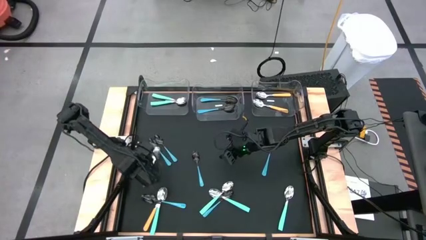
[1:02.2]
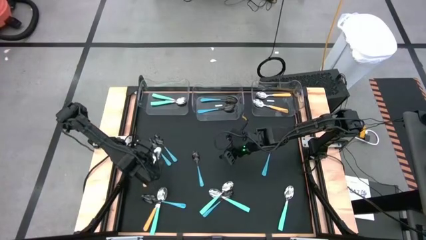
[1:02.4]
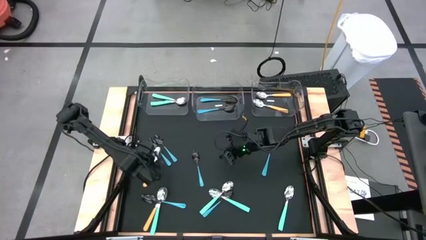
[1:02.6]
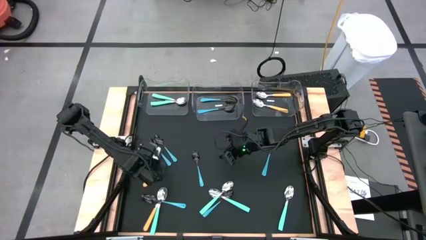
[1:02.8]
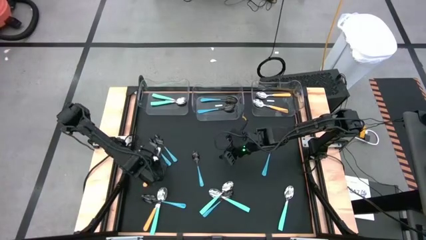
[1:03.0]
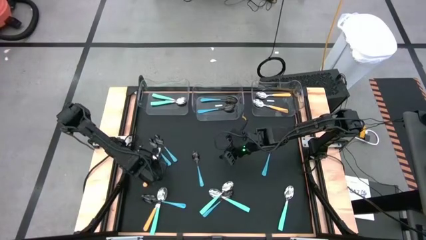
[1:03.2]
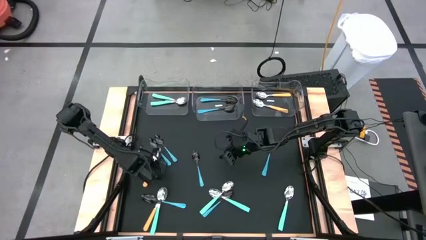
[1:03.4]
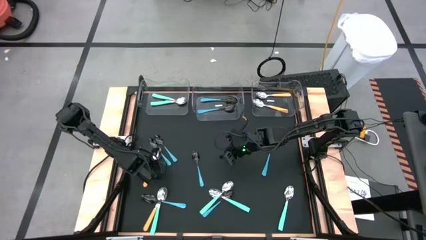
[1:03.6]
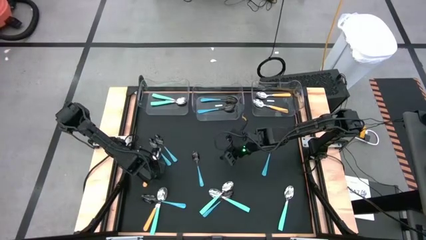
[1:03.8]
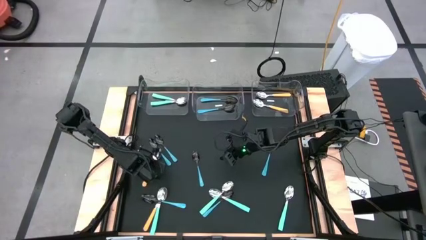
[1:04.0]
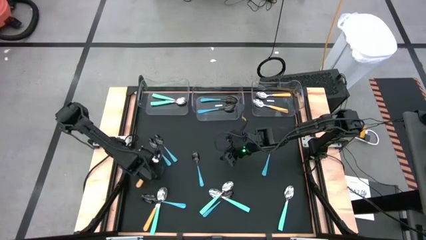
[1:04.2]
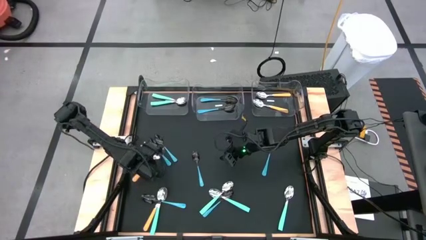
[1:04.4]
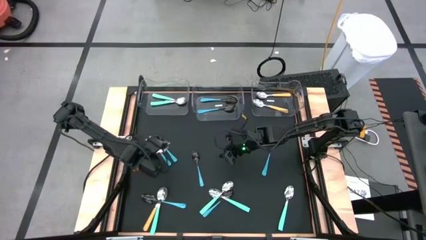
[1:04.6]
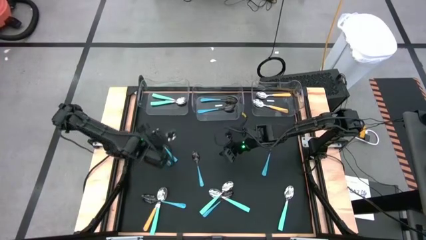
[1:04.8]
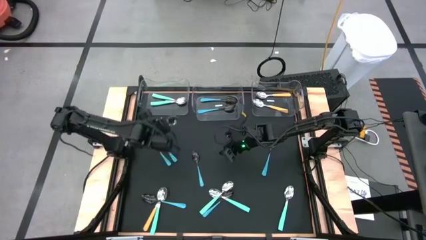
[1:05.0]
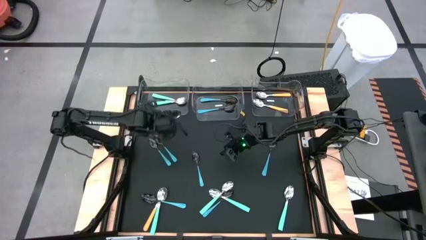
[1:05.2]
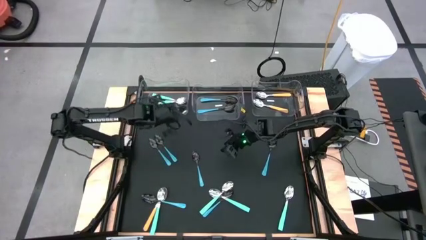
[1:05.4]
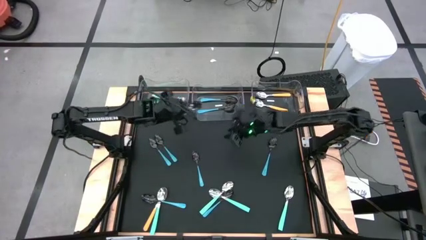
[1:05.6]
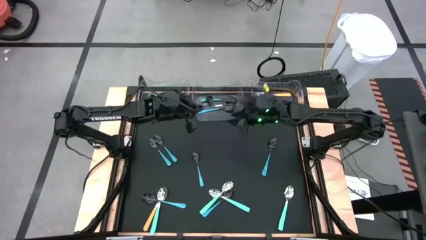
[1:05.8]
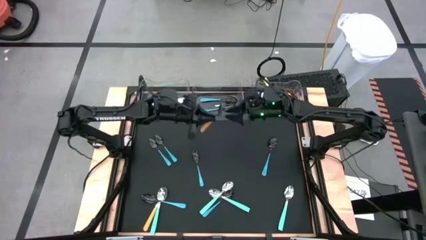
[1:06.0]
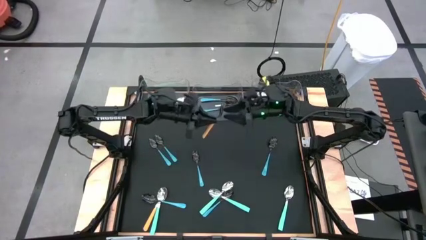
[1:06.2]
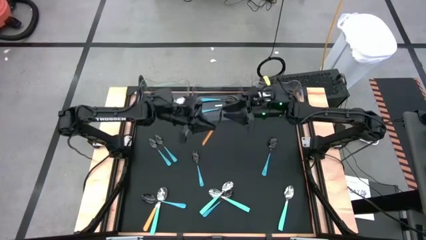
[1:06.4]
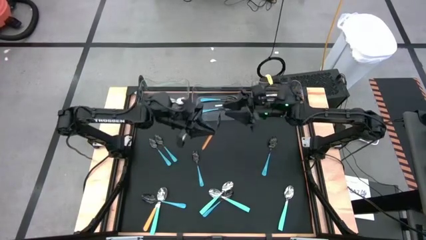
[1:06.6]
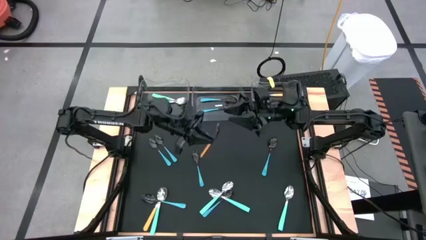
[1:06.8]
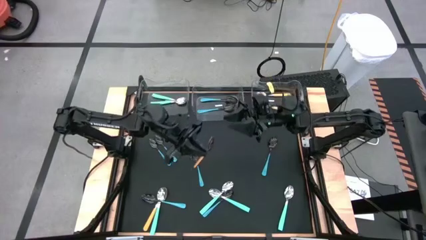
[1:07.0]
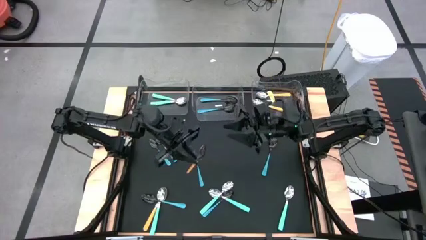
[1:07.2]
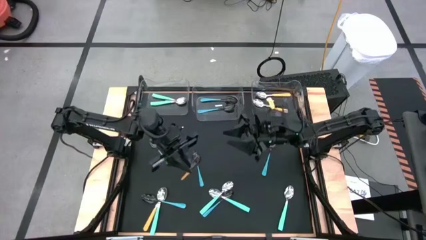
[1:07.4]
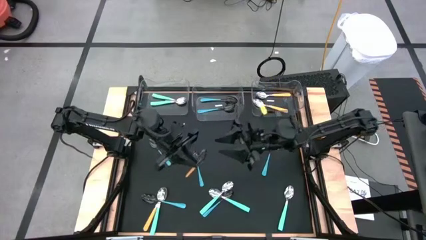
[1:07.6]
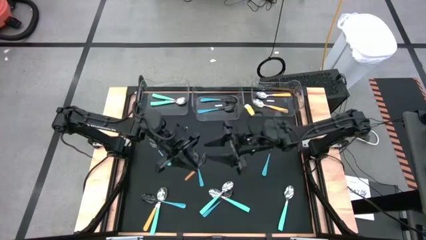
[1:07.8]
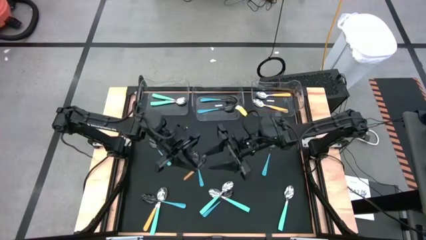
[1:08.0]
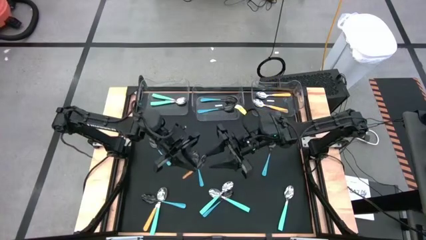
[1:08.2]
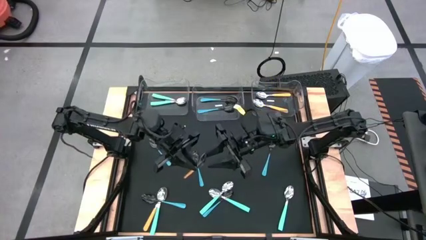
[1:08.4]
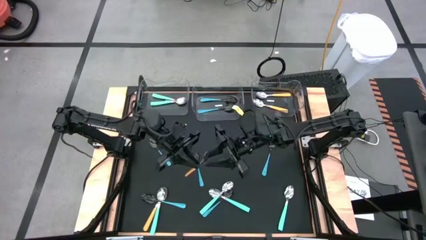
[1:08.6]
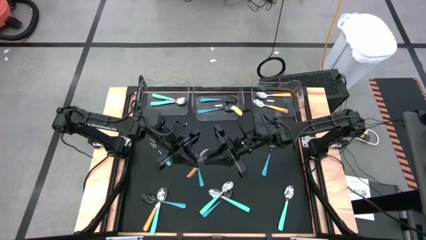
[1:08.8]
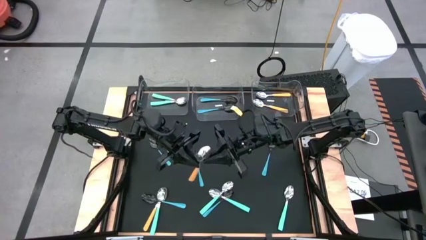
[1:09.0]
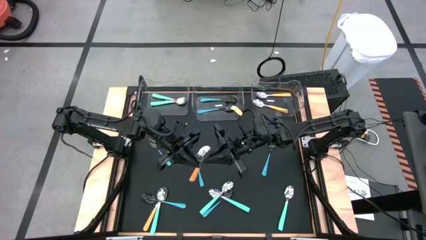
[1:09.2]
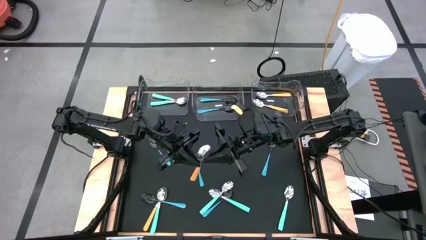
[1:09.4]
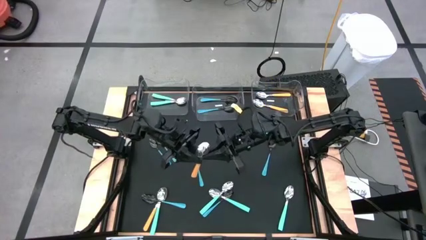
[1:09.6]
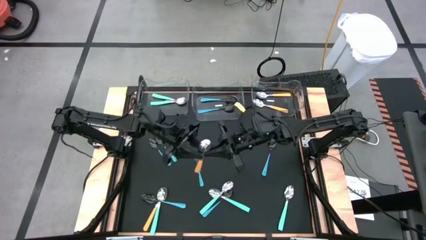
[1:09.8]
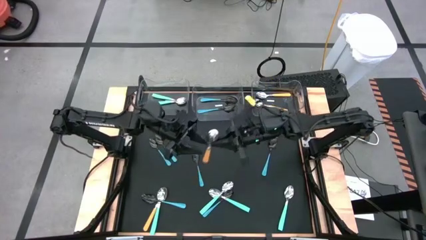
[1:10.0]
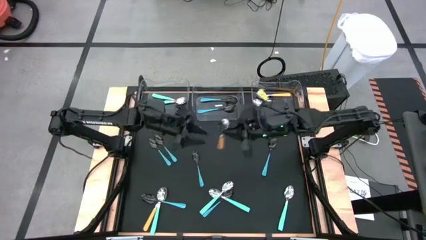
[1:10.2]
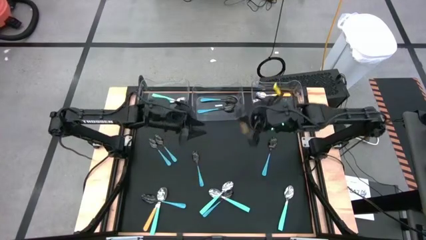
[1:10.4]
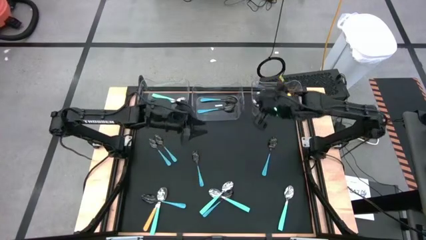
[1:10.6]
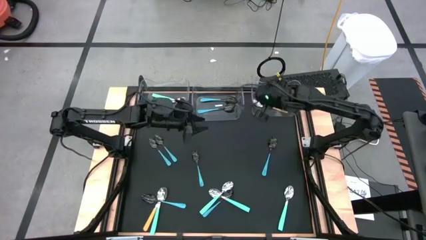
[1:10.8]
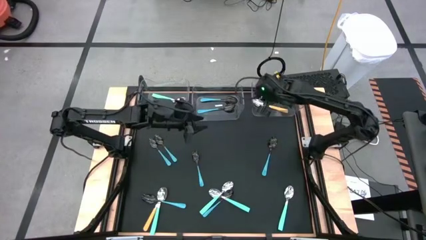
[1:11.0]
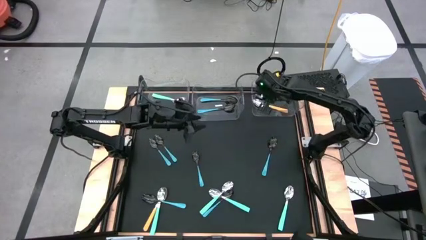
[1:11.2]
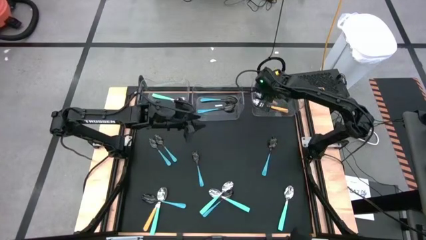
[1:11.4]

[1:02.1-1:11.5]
Task: Sort silverware by color (type)
Put the orange spoon into the right transparent bin

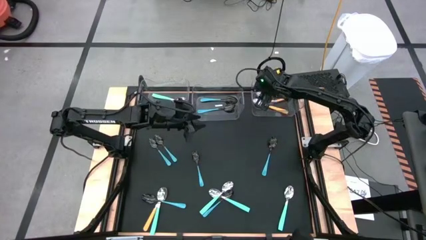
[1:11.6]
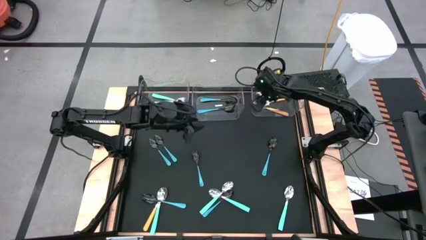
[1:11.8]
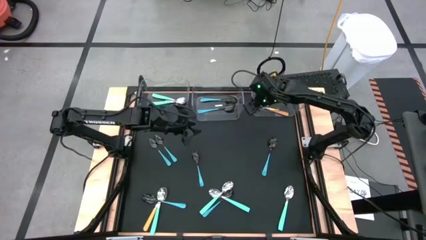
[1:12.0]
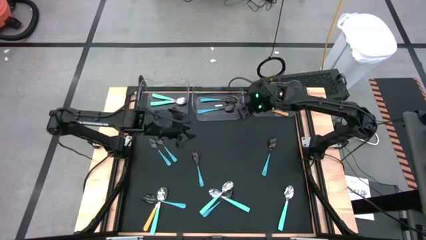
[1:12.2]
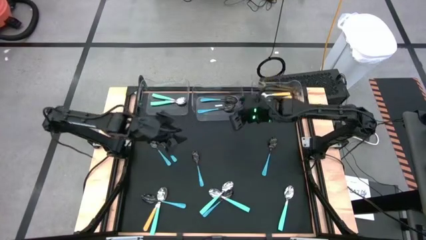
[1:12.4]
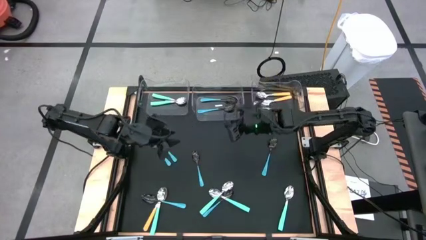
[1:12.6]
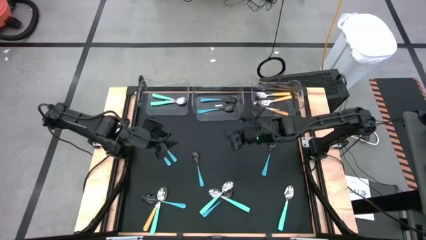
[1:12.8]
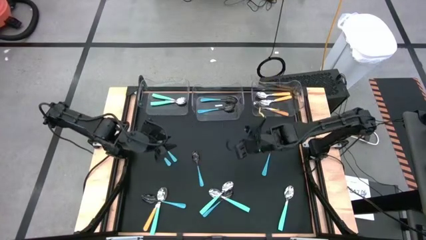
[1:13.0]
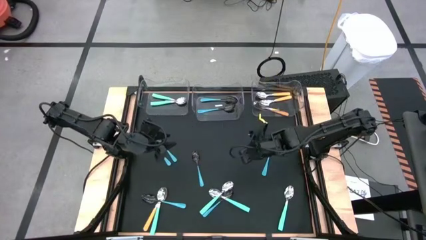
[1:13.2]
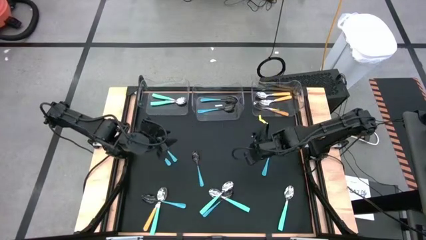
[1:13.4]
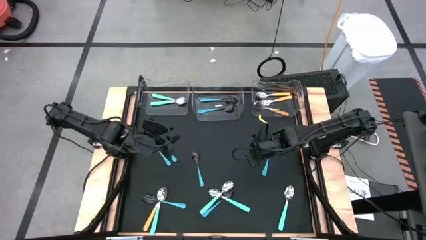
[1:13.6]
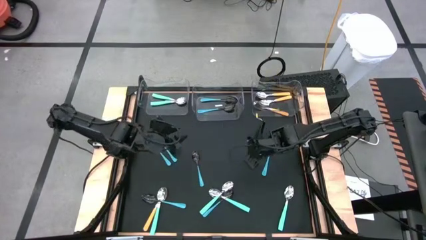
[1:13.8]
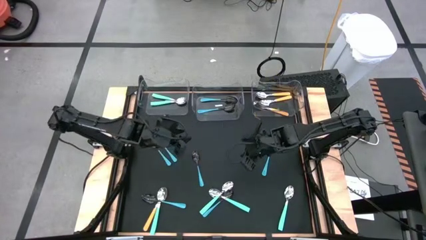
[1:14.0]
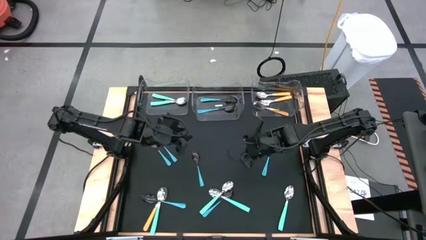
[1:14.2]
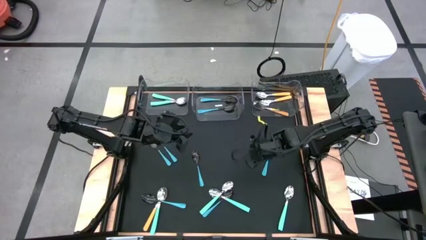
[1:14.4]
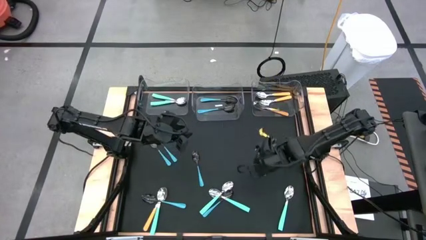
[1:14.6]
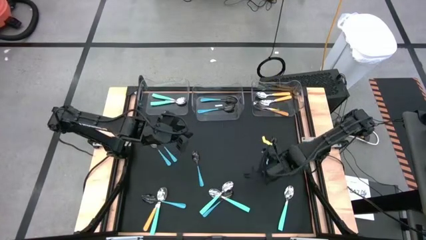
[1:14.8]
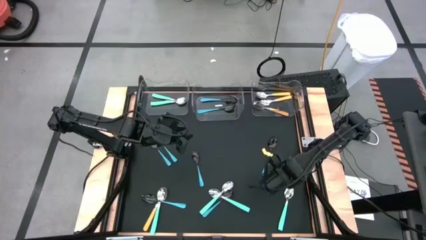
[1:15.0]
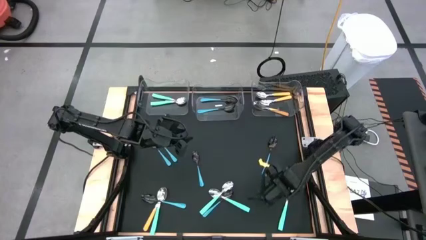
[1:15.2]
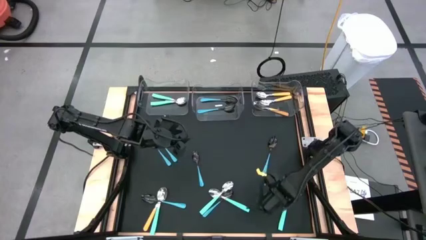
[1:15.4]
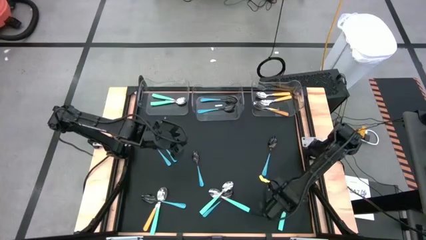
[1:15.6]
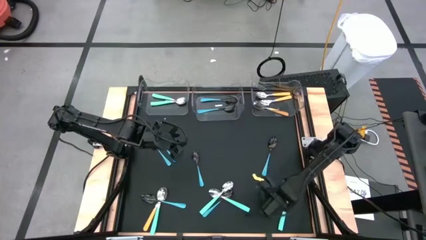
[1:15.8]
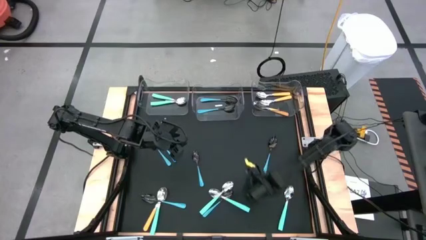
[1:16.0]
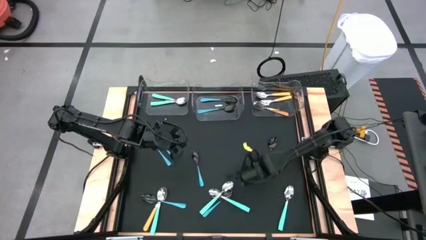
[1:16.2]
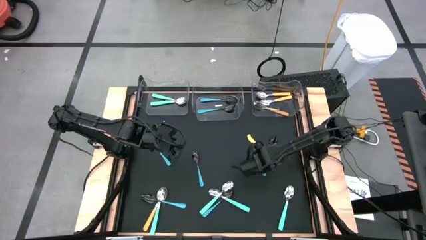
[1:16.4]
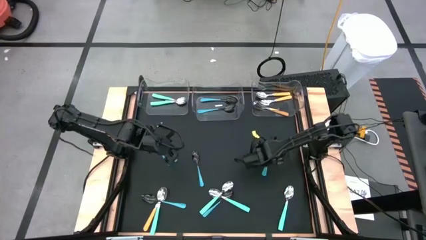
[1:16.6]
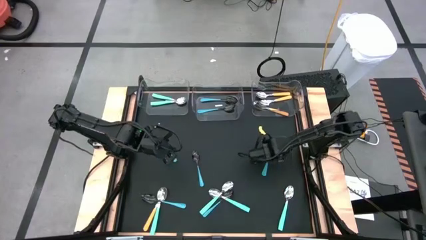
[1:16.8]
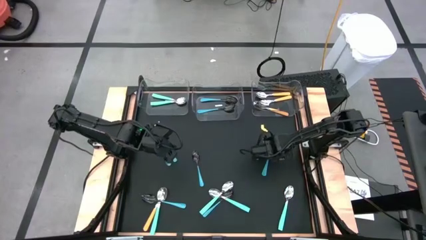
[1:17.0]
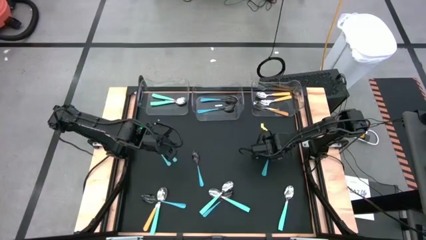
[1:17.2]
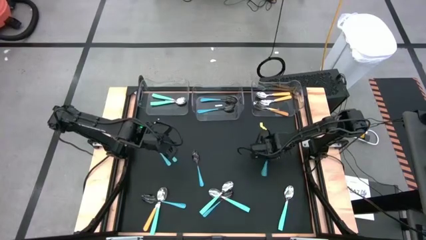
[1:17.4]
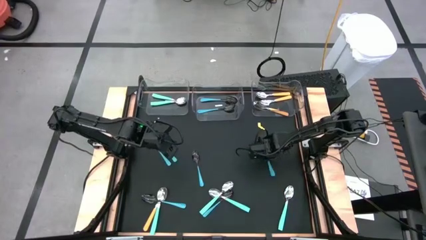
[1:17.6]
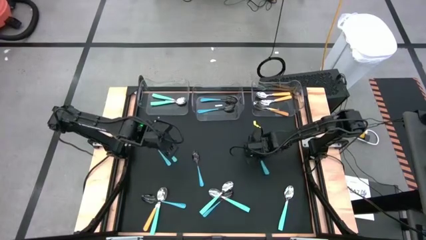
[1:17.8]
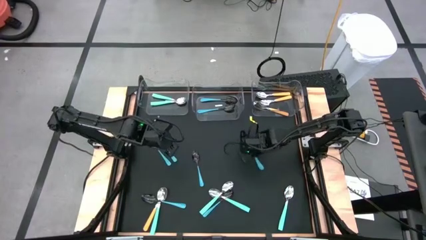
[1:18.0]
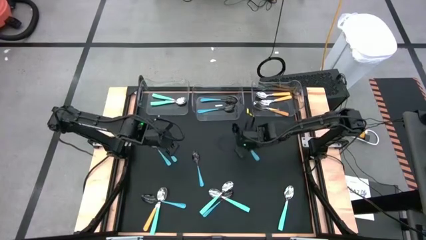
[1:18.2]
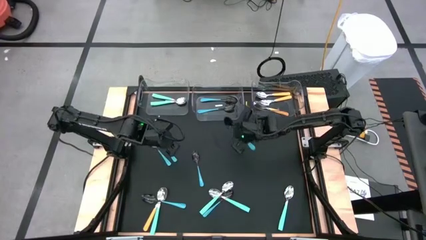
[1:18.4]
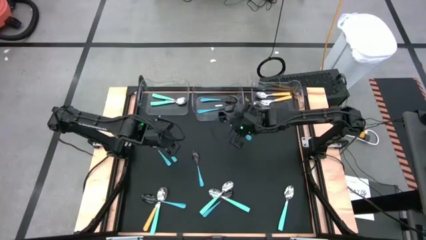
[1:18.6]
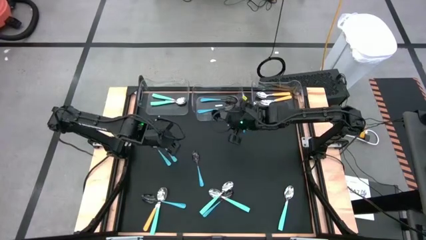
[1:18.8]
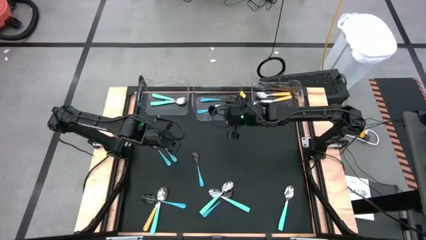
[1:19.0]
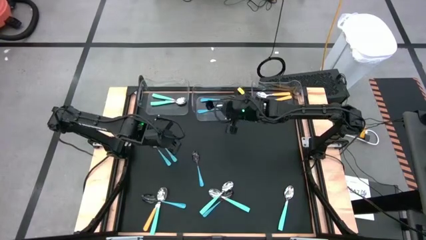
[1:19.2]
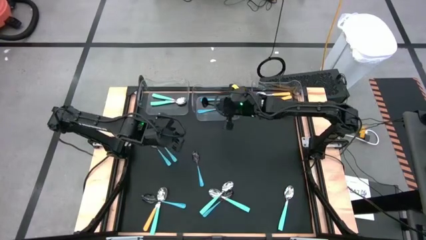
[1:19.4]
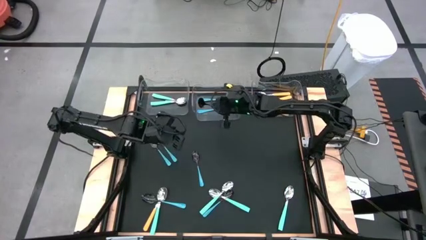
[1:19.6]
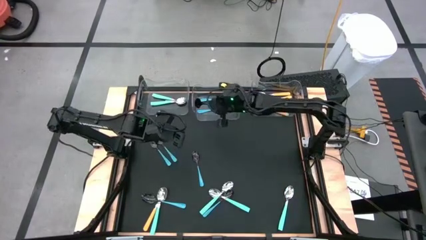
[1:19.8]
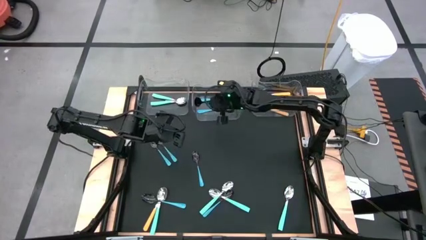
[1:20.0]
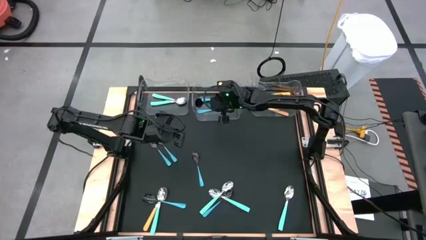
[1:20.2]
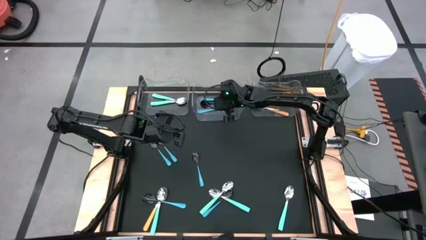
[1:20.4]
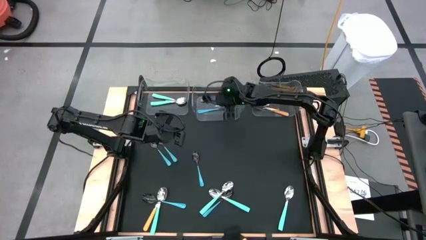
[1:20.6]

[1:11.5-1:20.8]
Put the blue spoon into the middle transparent bin
